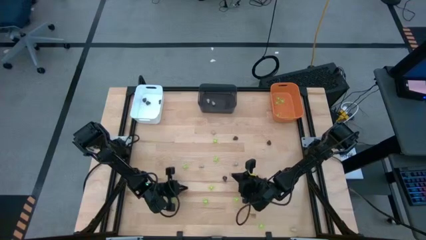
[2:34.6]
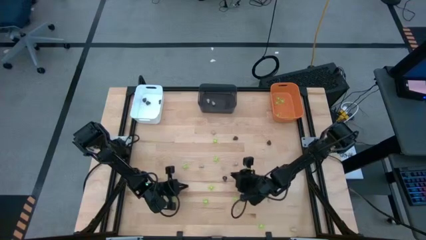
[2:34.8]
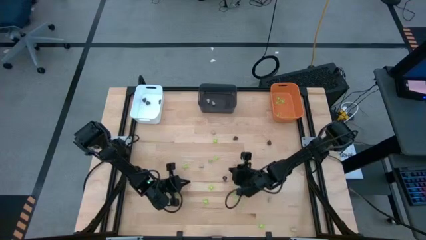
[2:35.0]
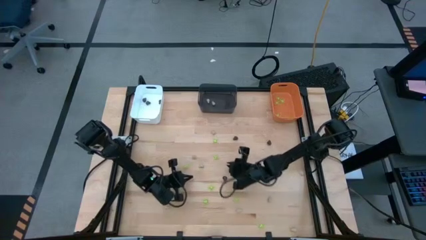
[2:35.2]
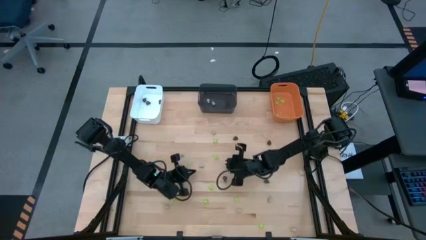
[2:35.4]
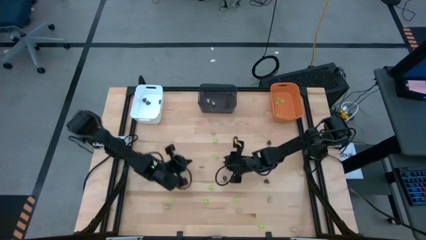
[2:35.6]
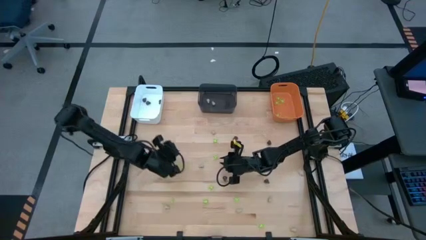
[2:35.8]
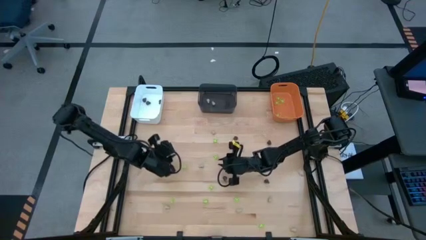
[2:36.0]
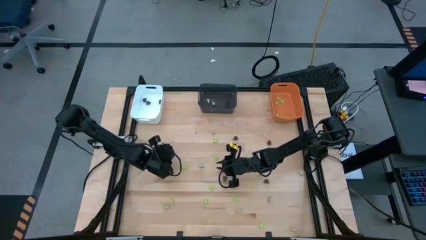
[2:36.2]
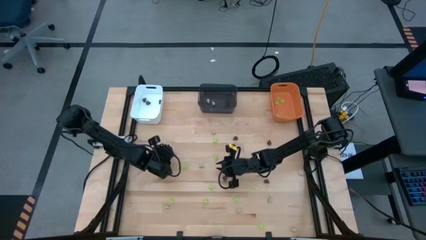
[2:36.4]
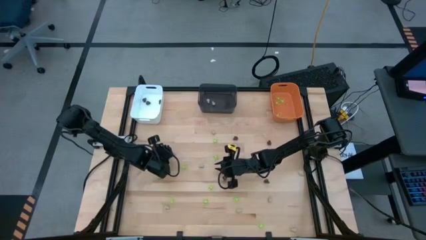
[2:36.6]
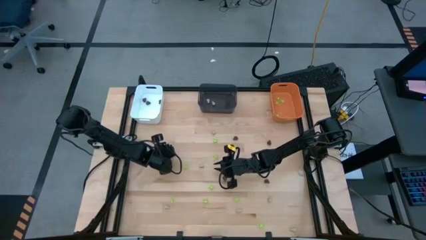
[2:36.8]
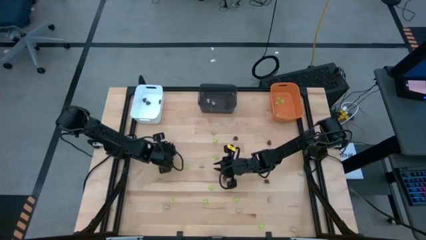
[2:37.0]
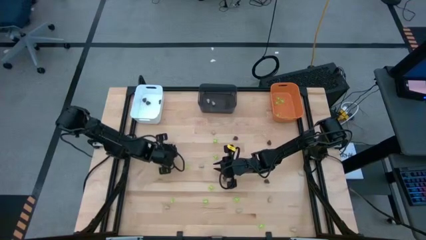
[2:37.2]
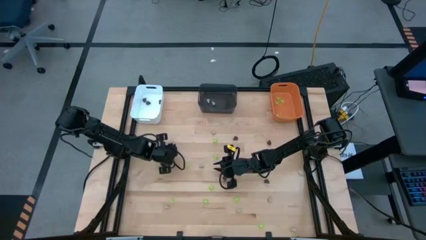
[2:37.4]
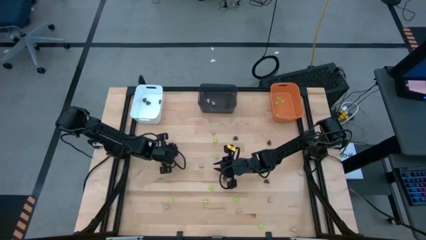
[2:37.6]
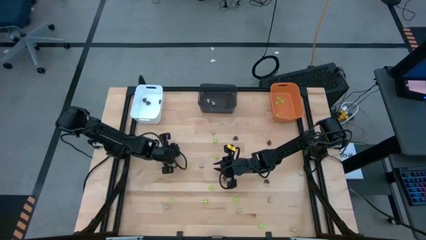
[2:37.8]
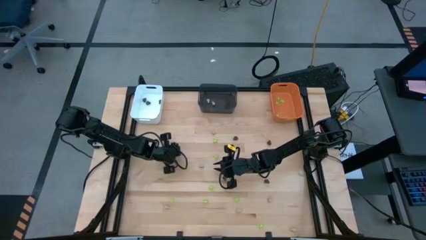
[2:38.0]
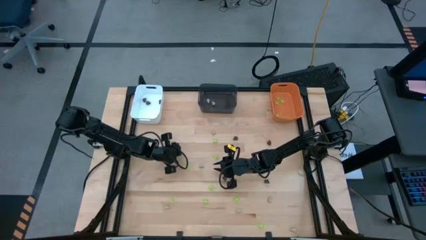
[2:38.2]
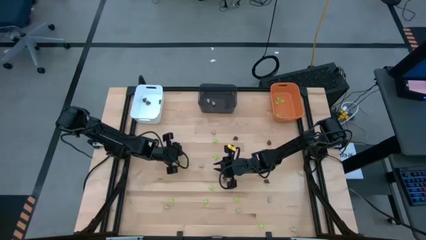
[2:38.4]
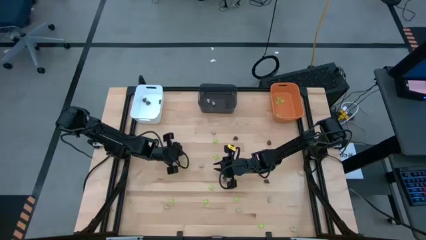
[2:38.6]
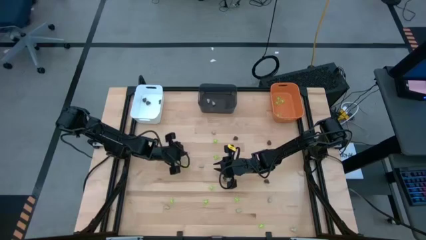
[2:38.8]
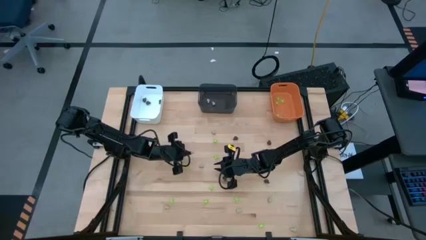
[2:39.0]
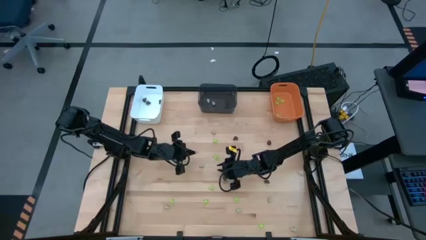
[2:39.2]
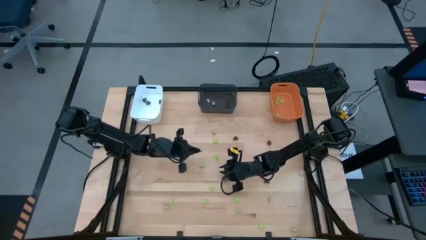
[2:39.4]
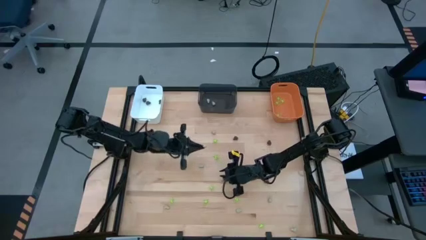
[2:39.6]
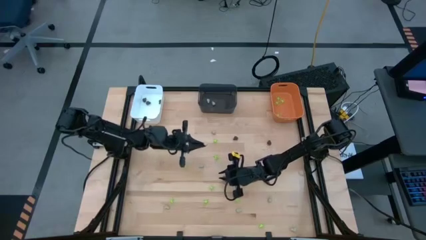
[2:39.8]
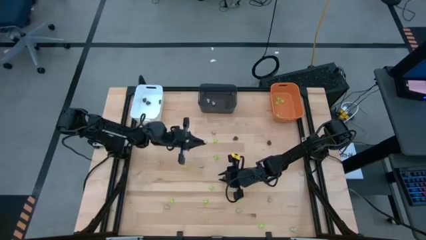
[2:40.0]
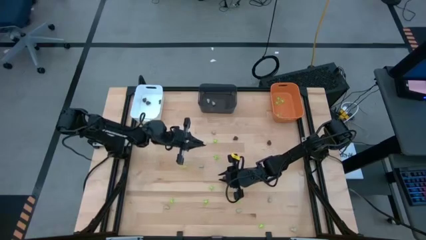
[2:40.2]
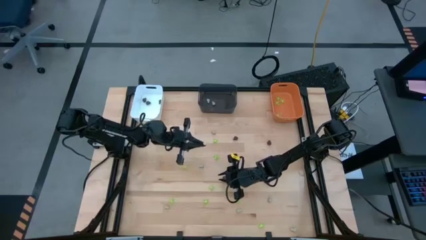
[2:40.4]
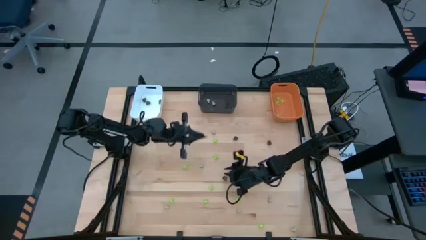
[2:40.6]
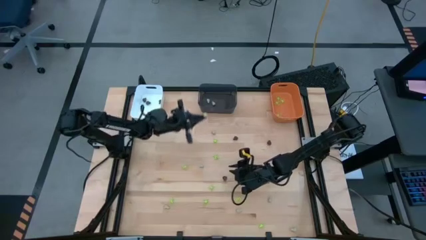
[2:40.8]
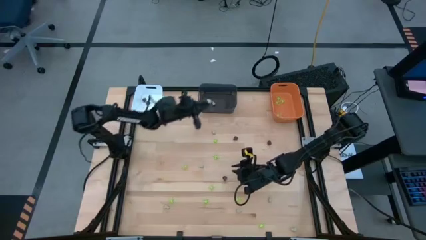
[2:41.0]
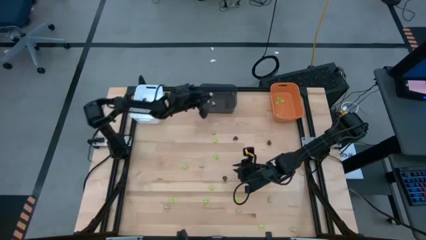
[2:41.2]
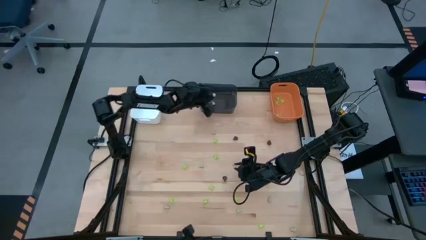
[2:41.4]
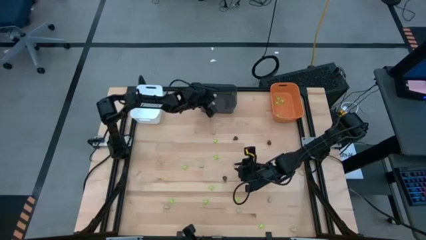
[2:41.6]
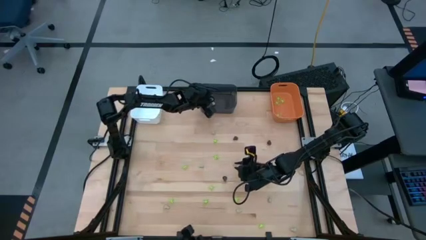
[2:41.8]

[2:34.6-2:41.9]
Task: Sort Halloween decoration
Put the white toy skull into the black bin

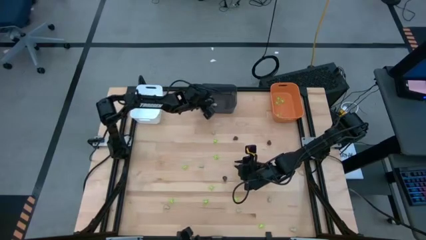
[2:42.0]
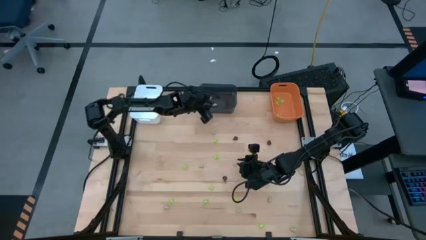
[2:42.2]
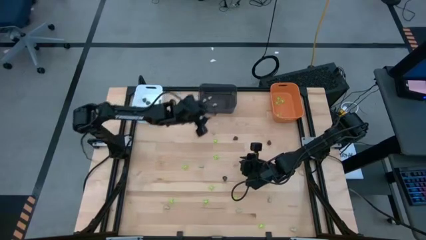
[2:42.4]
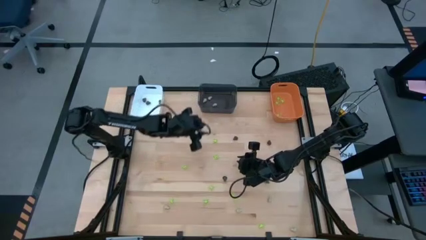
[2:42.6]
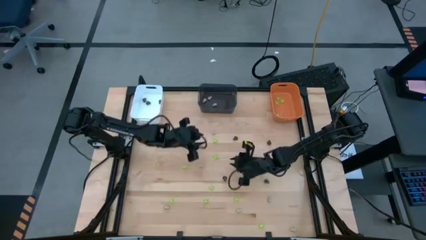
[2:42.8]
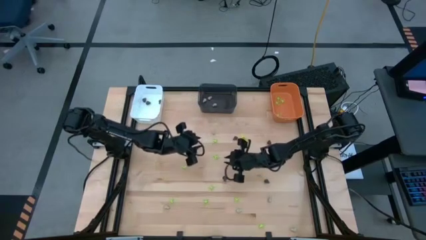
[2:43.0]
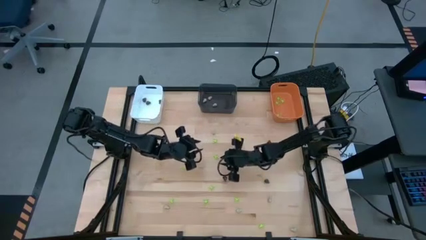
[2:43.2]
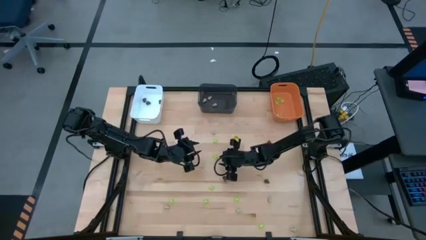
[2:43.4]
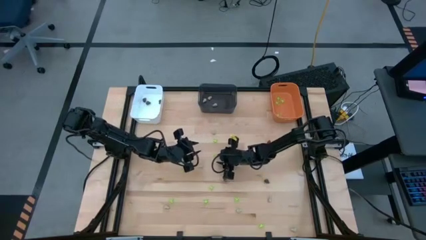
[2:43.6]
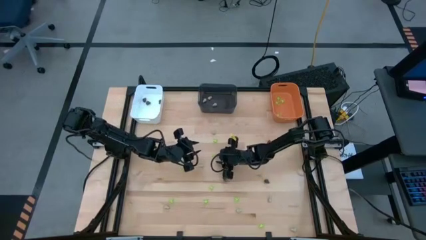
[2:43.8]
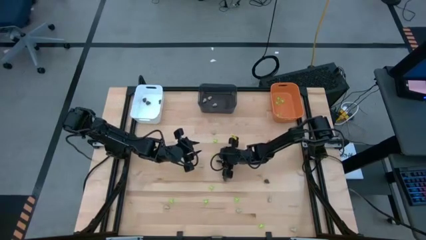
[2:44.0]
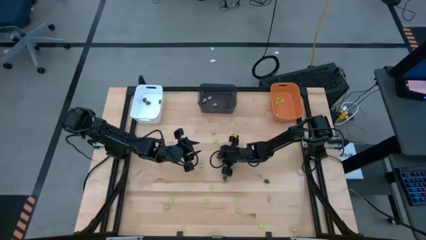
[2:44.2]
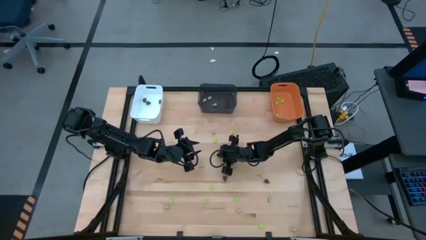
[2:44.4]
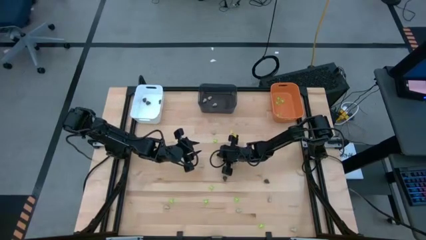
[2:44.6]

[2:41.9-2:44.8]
Put the green toy spider into the orange bin

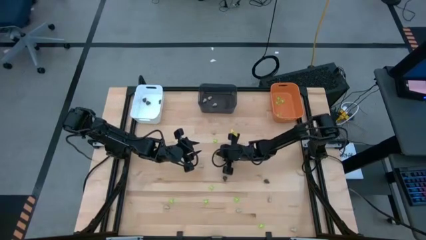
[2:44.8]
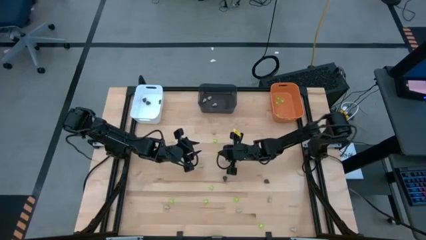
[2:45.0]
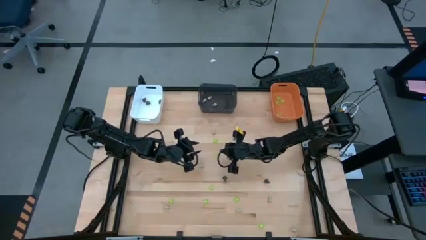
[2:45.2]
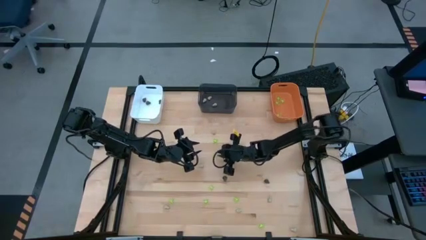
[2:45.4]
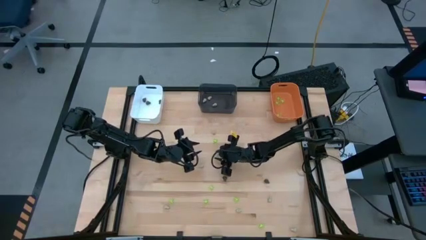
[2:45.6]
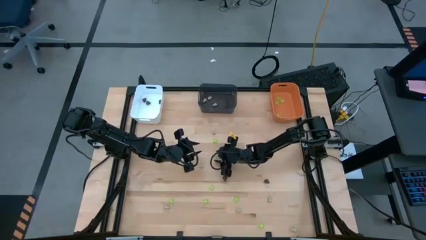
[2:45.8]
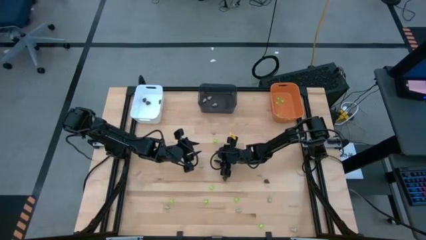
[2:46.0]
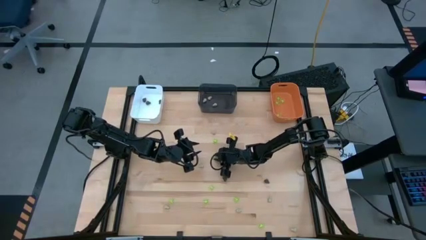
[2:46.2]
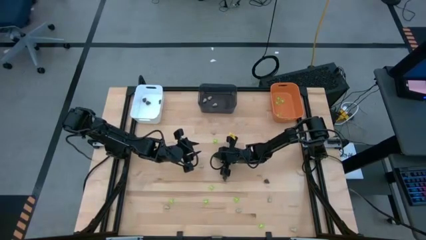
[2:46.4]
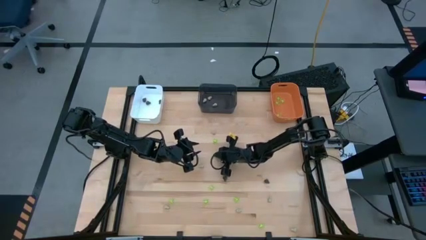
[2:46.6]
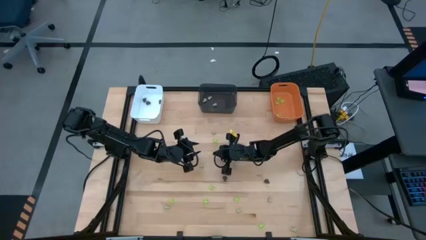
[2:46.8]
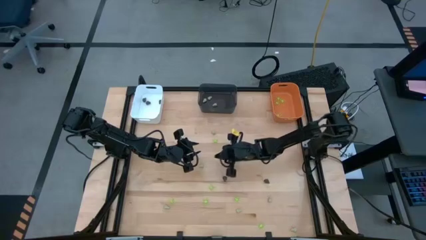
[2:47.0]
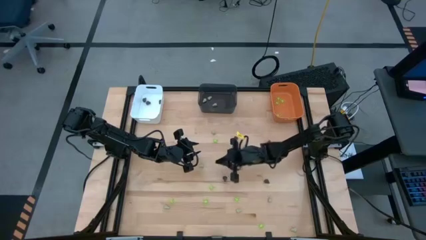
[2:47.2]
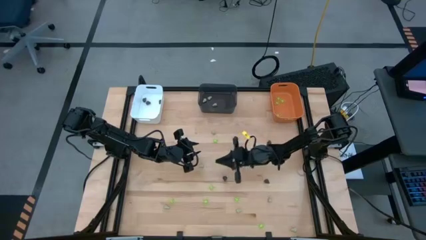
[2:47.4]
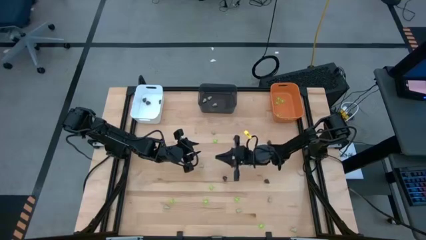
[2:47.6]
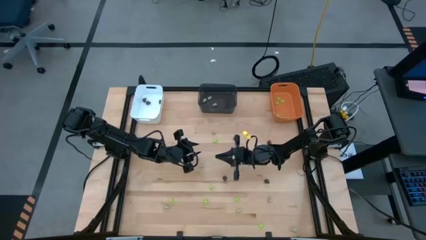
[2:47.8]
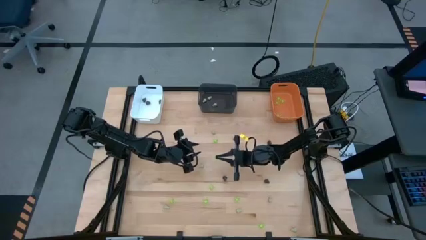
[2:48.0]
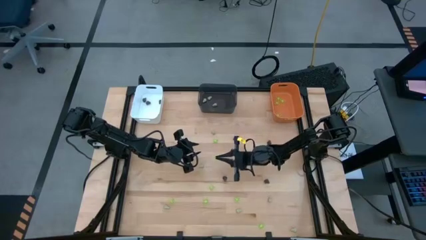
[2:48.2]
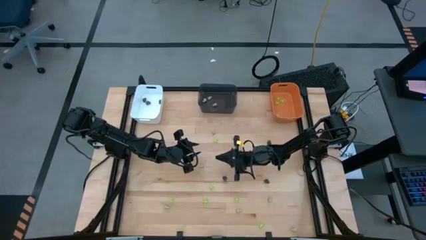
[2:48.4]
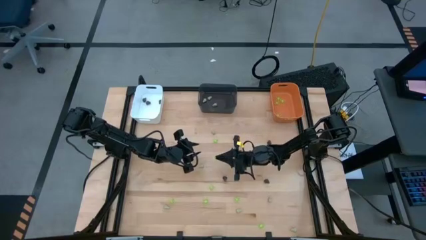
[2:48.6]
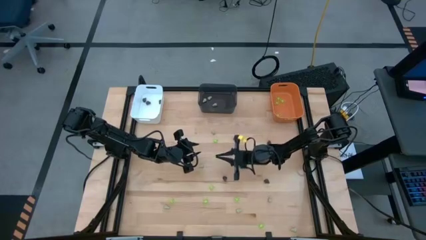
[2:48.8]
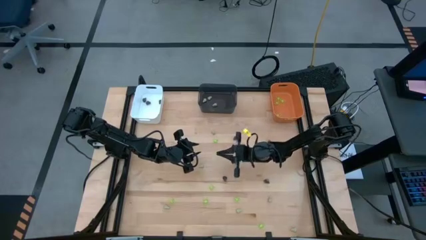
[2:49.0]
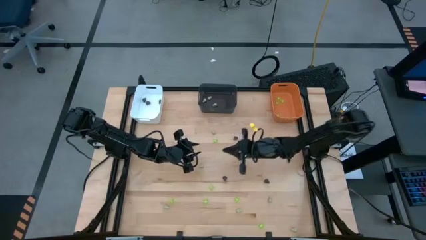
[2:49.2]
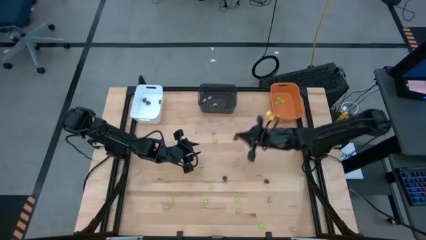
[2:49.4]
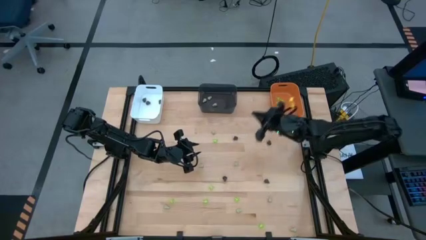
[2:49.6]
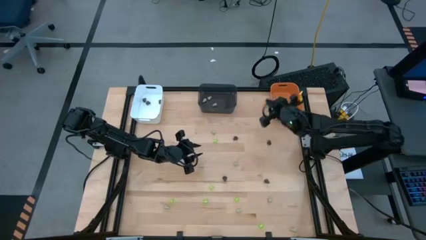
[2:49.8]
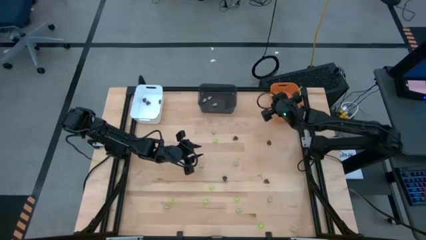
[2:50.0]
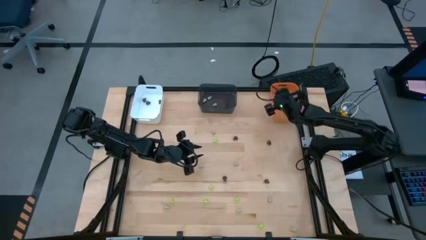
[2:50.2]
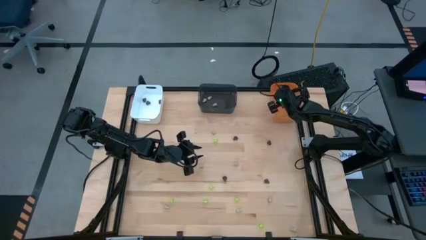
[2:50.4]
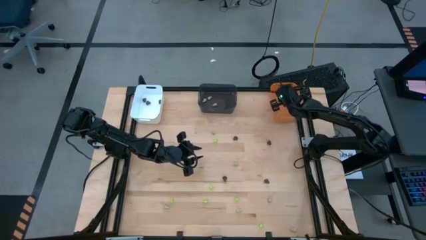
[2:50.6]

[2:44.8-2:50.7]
Put the green toy spider into the orange bin
